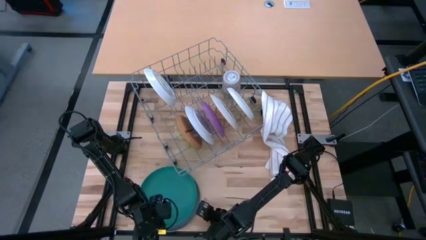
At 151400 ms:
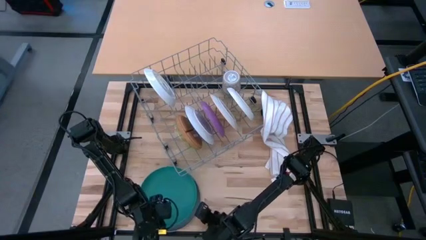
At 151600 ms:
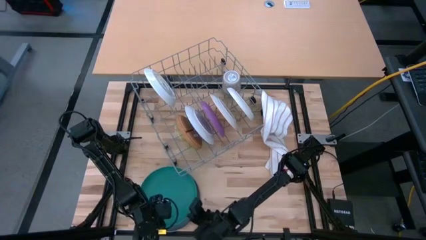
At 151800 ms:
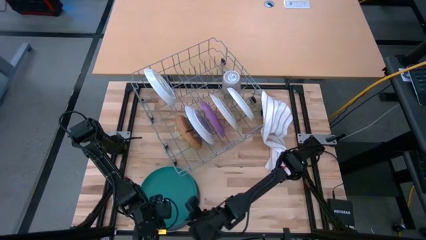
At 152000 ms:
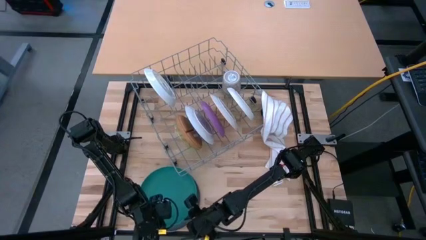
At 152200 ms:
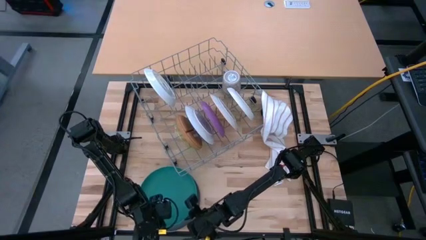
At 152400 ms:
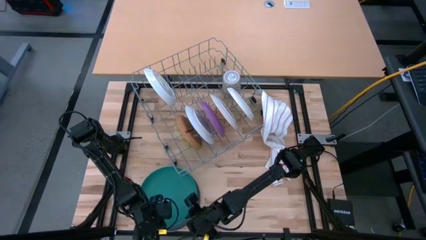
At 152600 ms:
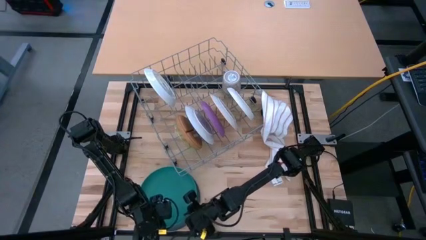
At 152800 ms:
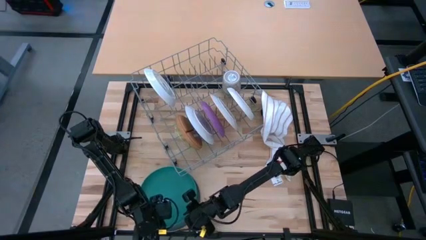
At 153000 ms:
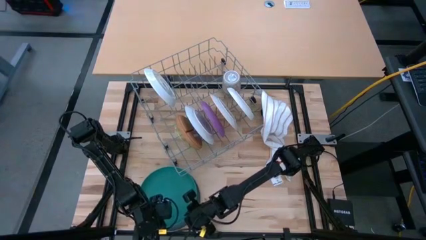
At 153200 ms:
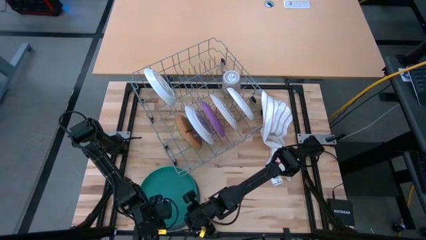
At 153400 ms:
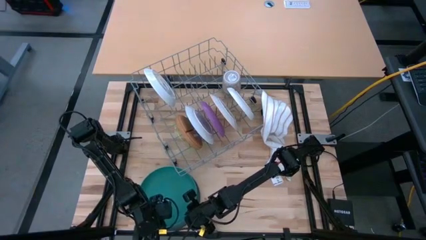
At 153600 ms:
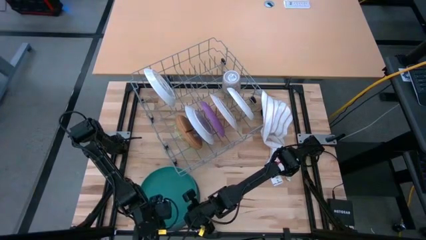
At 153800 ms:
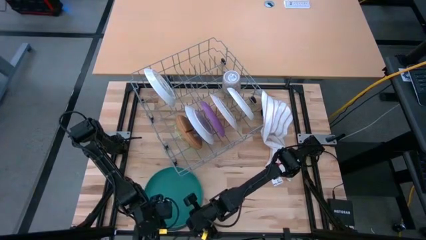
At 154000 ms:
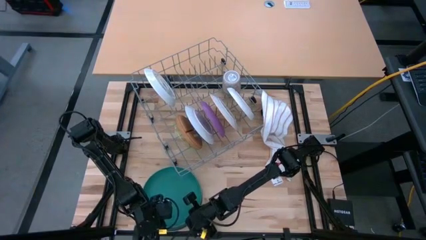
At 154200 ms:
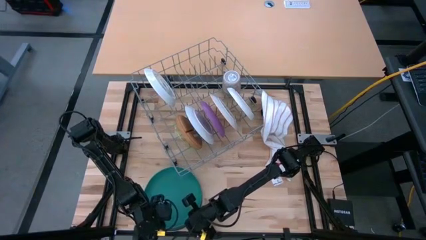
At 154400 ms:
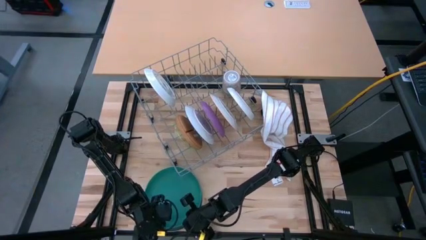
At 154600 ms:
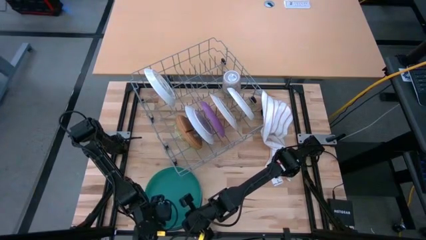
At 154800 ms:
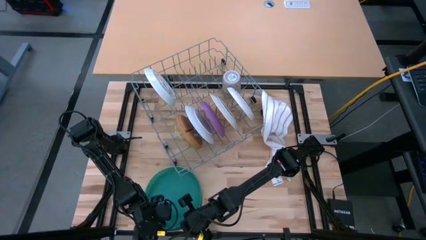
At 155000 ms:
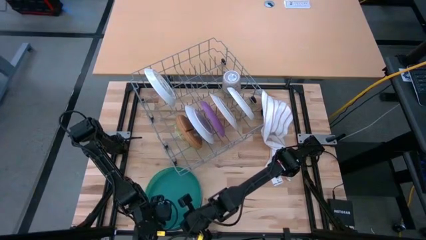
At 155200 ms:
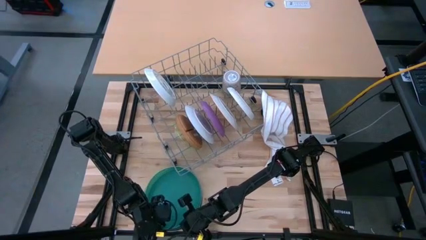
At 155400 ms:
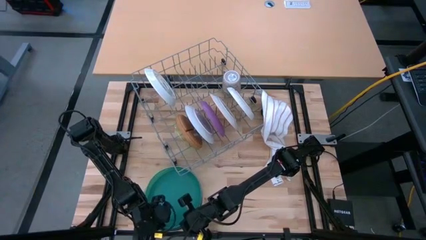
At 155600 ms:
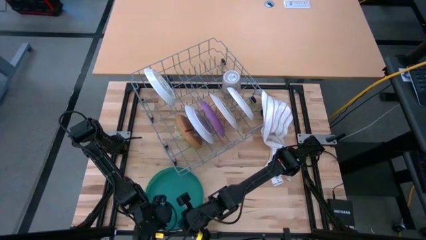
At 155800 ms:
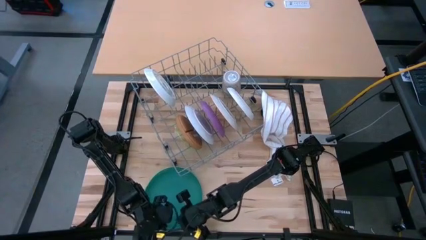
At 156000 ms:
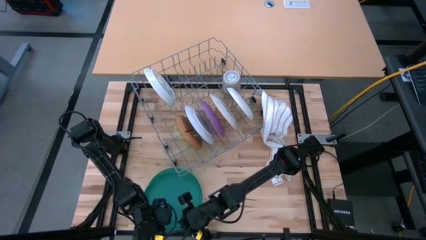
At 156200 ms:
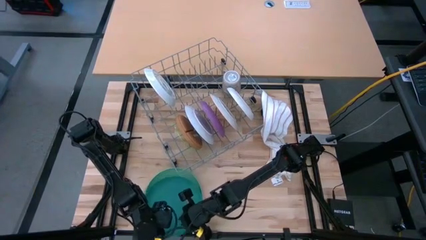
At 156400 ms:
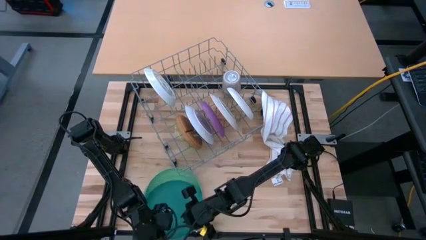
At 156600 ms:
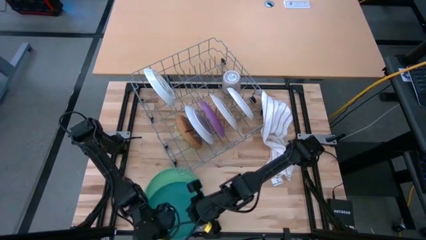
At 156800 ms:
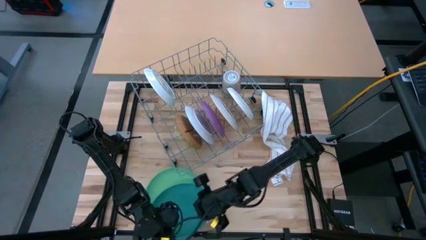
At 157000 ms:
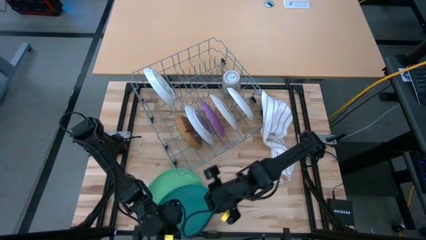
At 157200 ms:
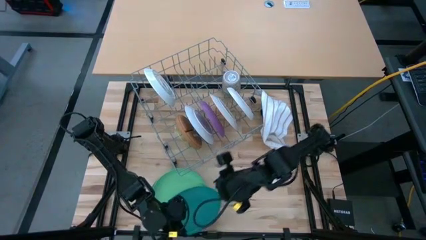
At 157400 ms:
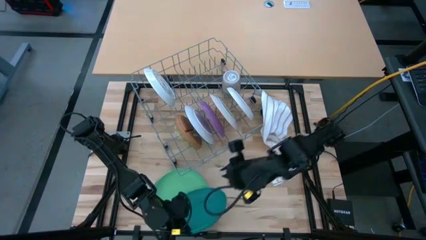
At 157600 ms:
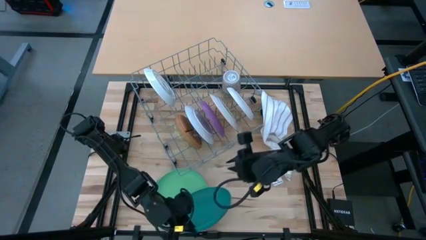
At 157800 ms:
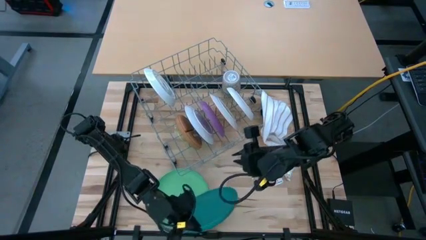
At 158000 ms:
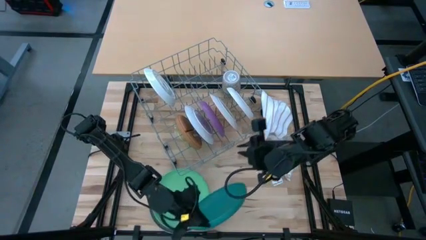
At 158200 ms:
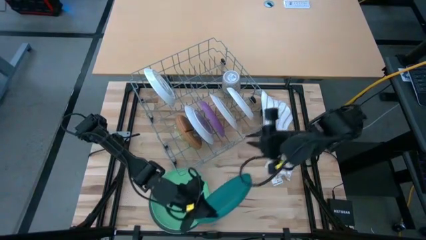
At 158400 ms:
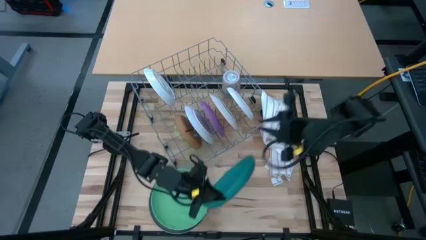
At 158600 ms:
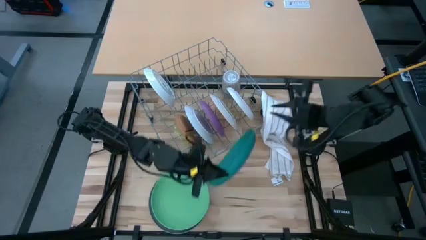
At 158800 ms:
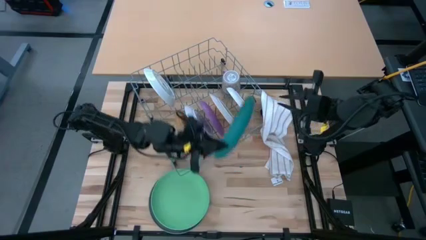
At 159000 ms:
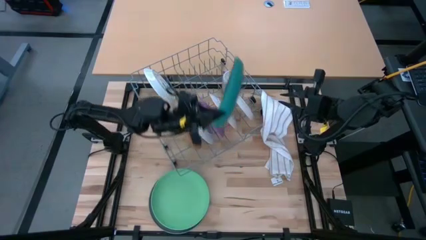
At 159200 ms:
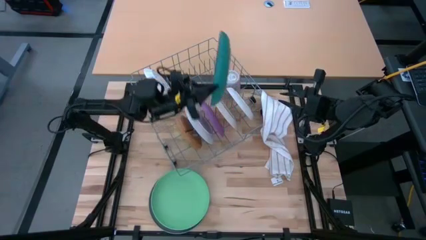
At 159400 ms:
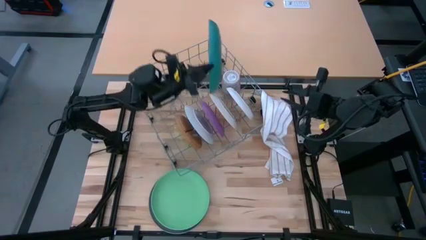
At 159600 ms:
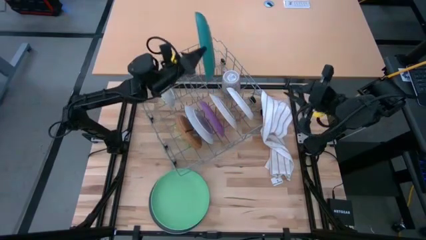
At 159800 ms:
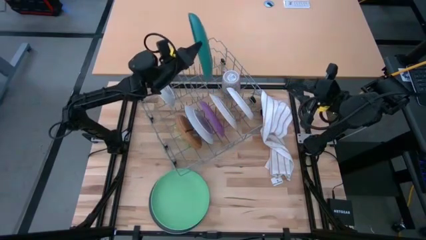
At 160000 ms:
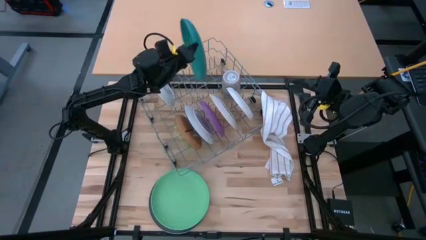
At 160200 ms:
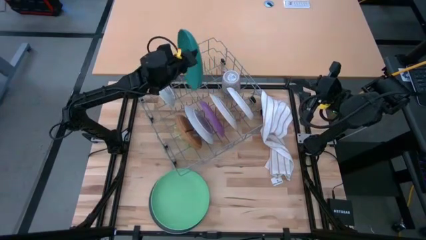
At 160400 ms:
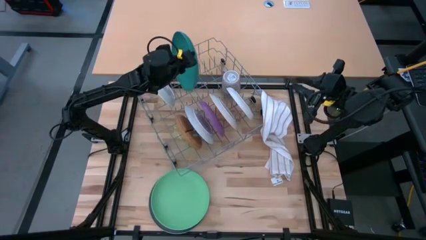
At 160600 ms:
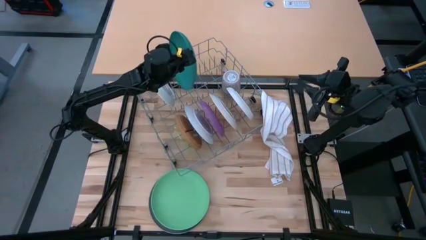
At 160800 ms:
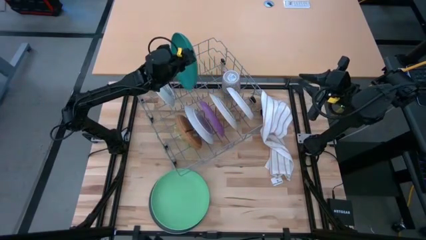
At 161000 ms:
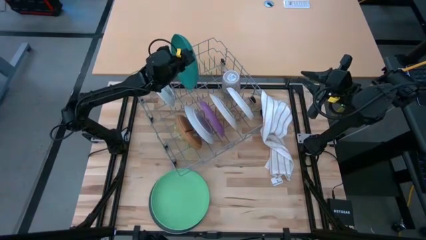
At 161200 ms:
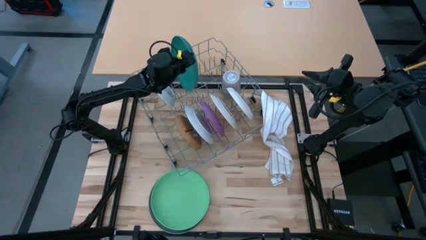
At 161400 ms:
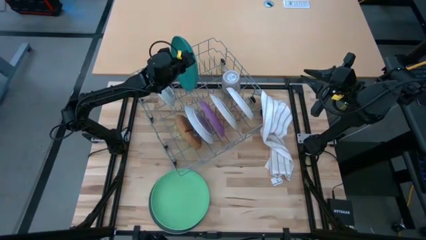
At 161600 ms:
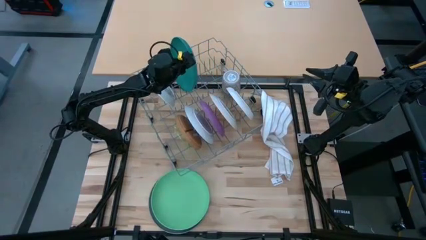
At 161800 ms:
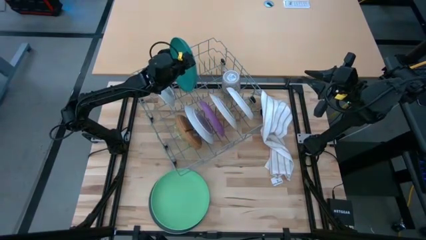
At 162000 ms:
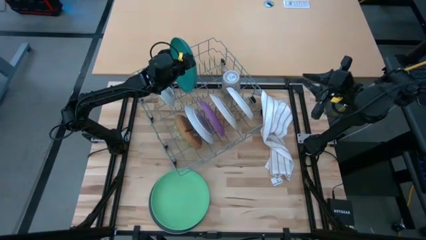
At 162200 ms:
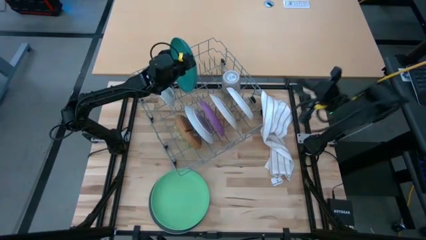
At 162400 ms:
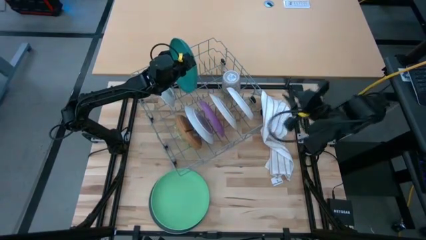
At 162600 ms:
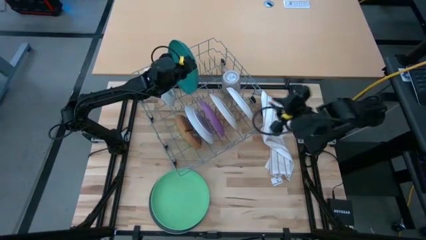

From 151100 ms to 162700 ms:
Task: Sort dishes
Put the blue plate into the dish rack
